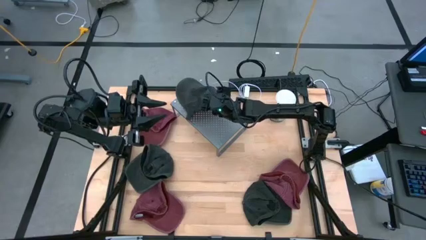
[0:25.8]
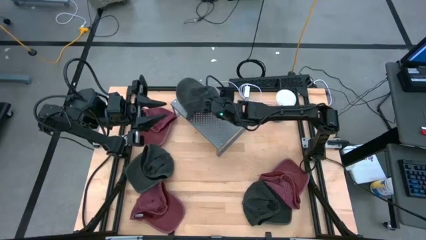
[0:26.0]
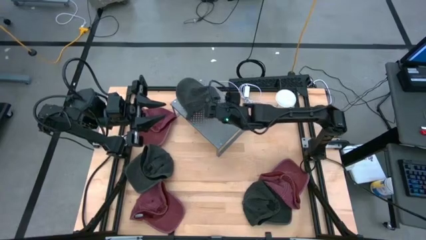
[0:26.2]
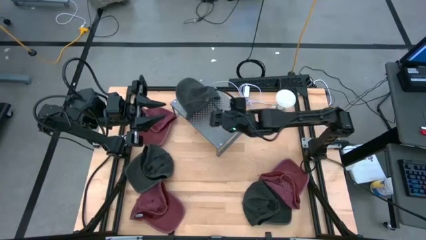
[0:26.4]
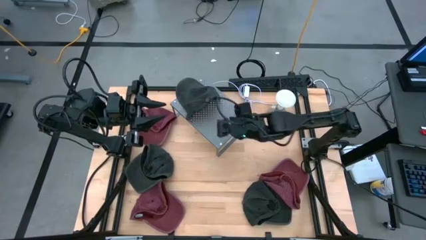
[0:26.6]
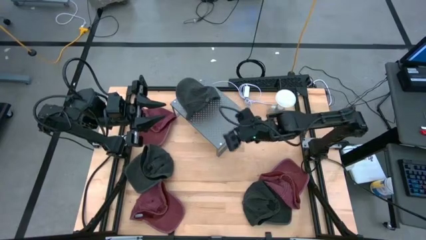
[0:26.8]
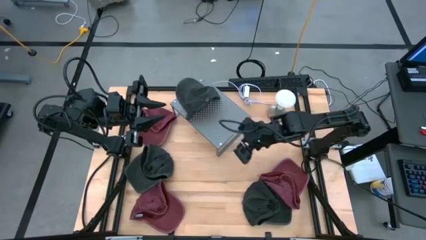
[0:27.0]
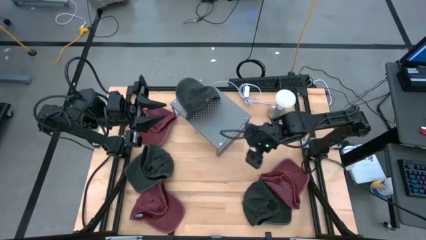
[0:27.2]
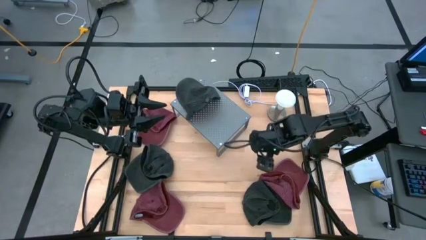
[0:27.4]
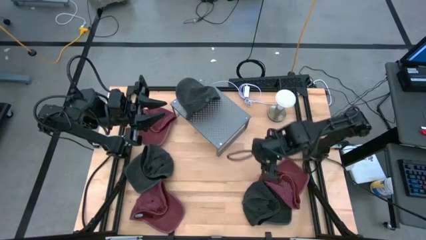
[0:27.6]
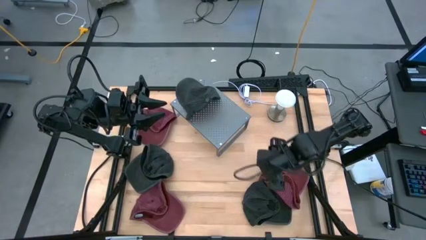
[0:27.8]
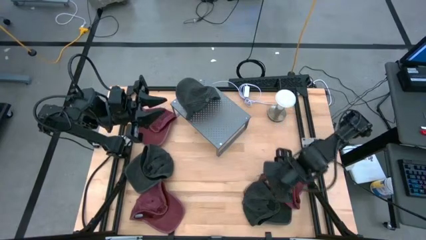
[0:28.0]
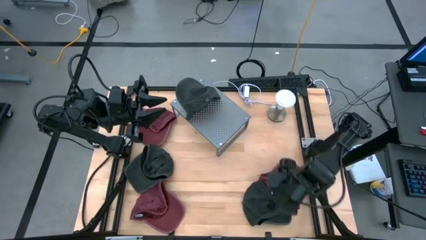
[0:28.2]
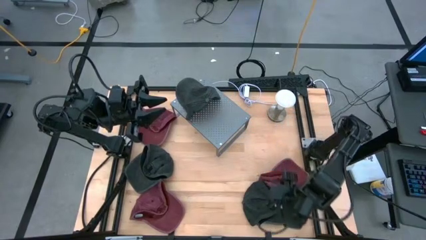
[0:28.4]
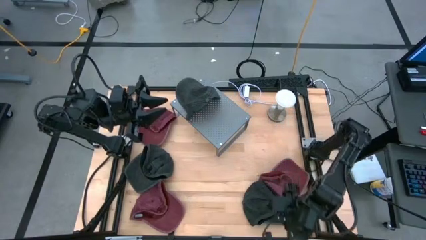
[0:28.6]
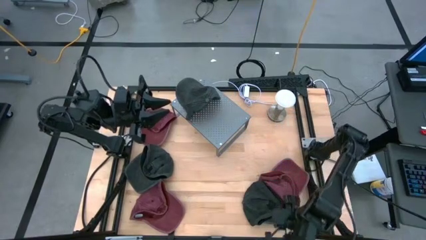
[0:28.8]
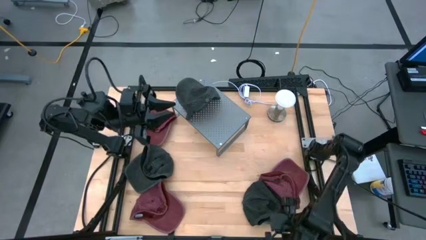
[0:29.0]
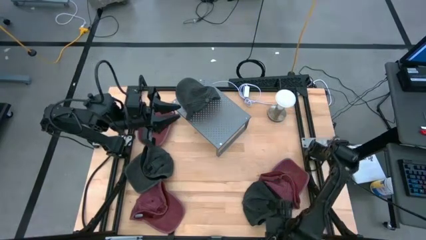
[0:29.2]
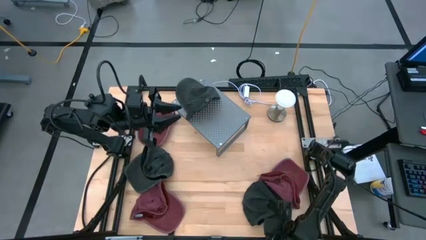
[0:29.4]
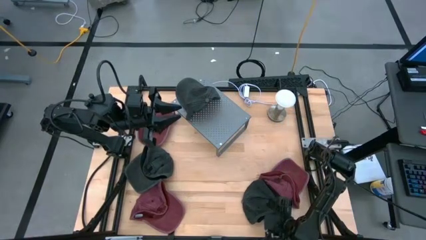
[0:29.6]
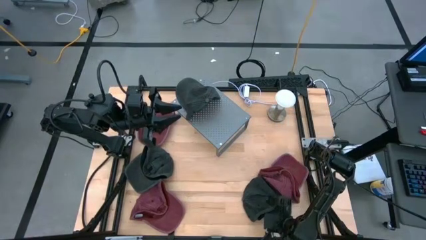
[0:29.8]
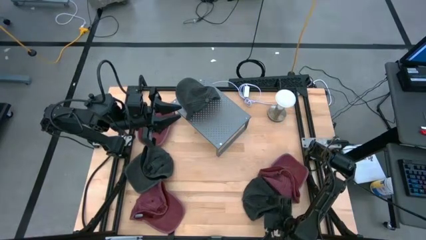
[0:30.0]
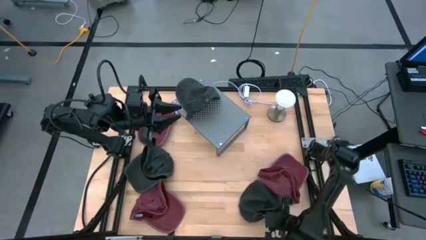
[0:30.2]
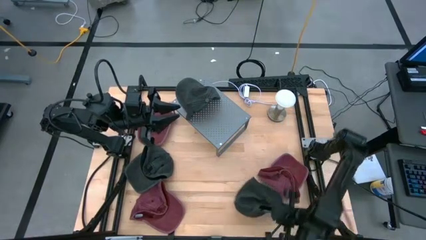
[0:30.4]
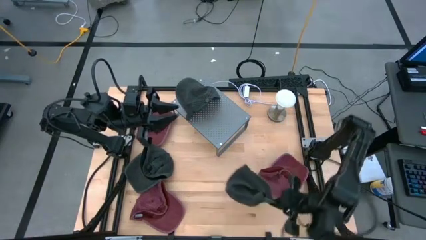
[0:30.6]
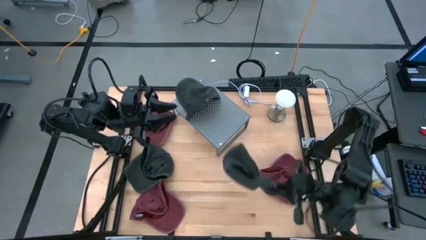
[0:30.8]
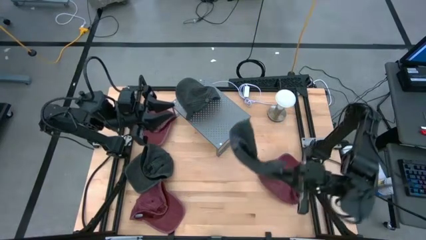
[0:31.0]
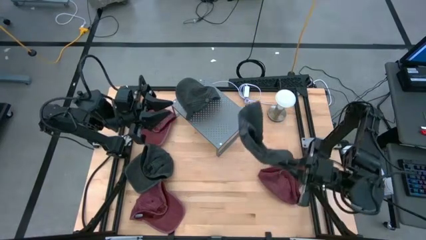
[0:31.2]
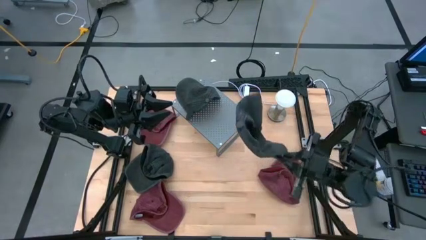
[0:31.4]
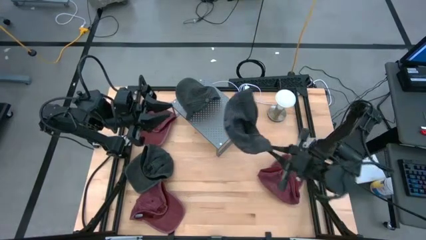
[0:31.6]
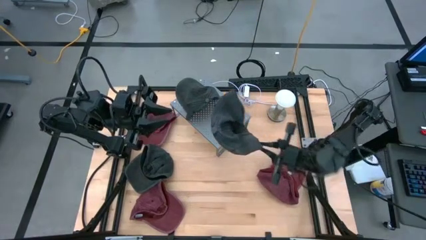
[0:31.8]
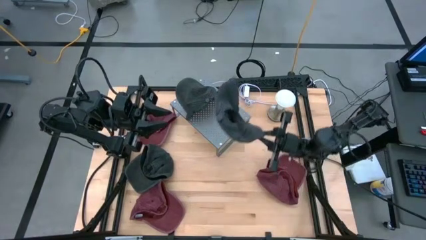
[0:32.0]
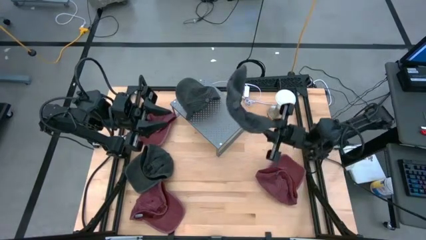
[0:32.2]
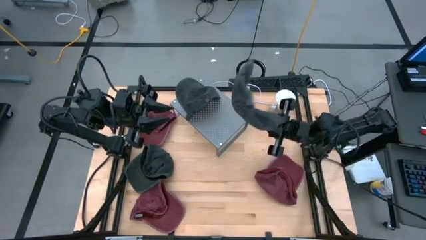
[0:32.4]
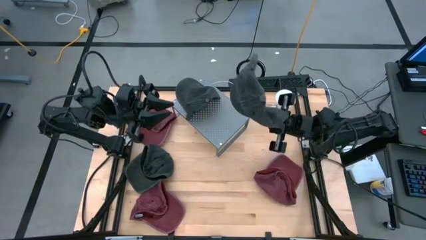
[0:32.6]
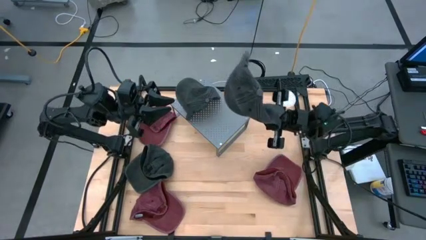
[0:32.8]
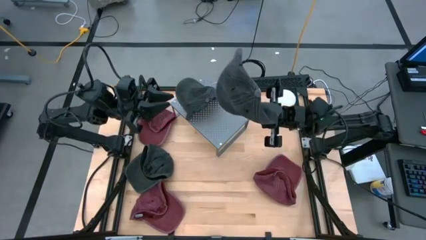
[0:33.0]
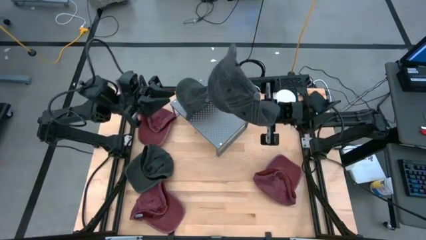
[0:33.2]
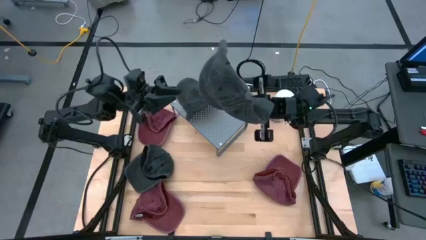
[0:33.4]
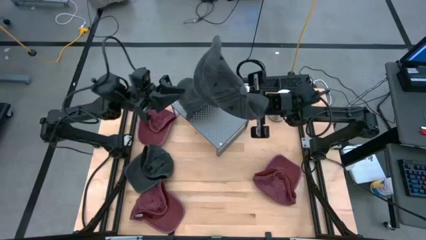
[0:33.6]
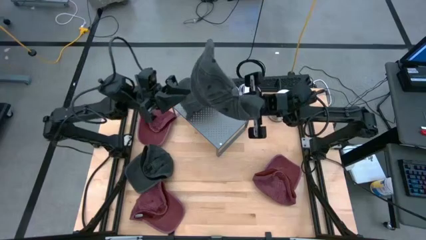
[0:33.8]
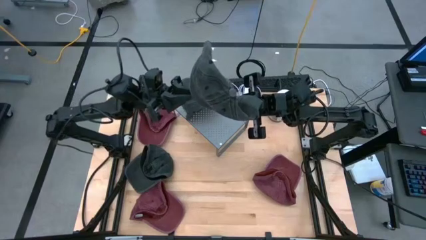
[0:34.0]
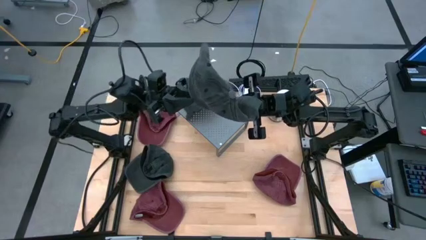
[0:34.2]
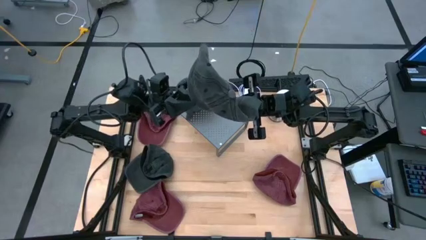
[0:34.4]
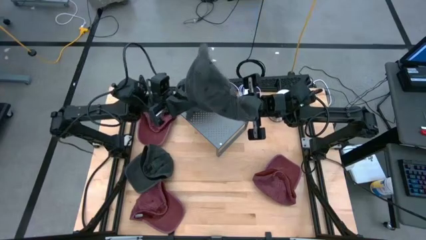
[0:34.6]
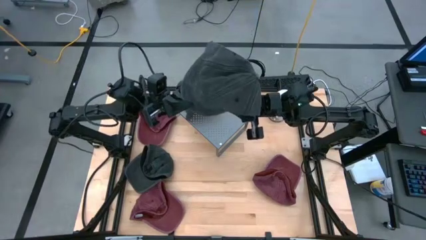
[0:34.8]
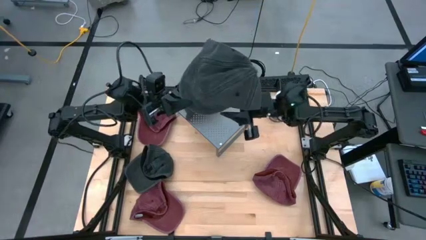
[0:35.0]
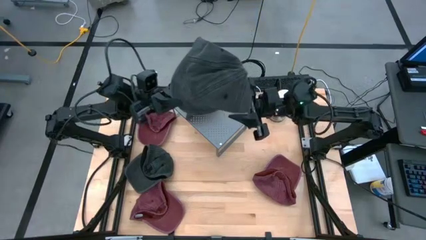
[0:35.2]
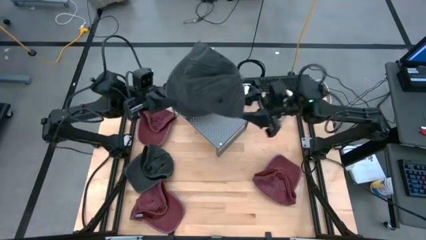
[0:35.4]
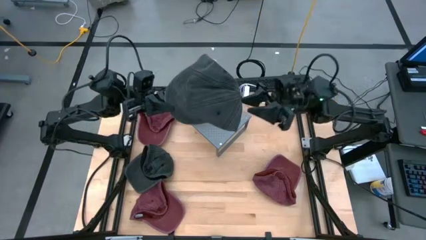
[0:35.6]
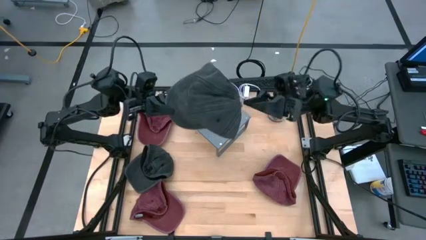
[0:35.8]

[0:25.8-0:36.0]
Task: Pick & Place hat
Stack the bottom black cap on the black cap on the shelf

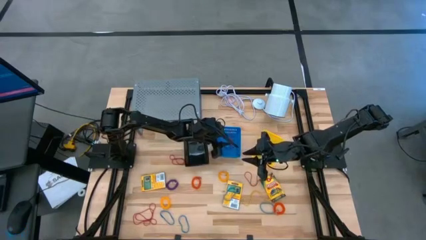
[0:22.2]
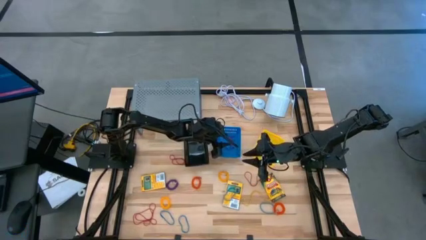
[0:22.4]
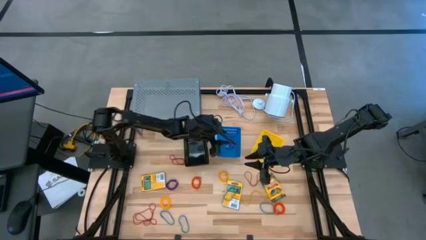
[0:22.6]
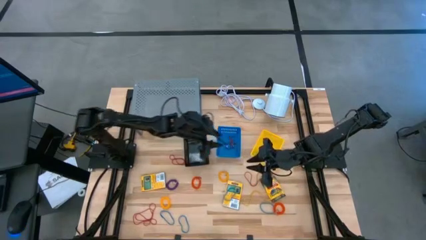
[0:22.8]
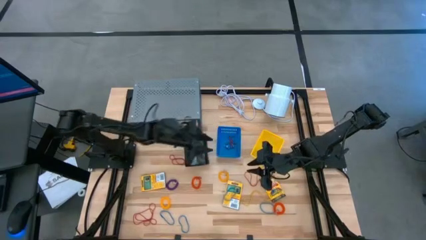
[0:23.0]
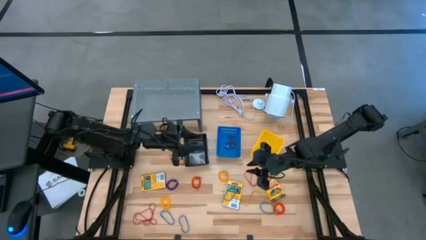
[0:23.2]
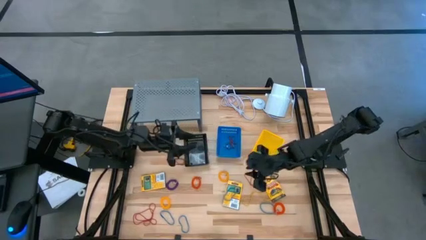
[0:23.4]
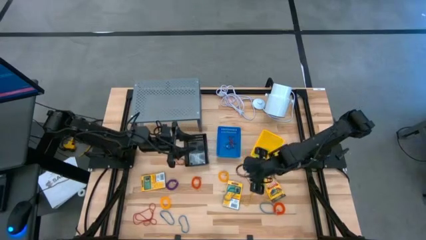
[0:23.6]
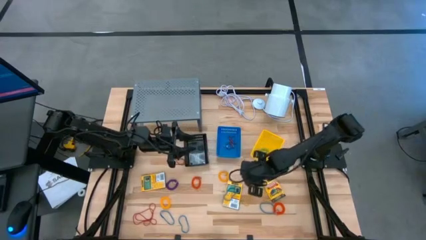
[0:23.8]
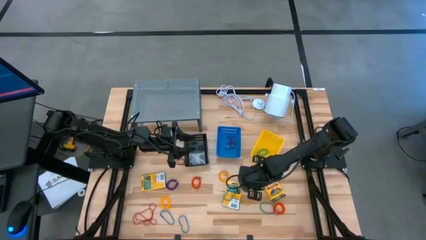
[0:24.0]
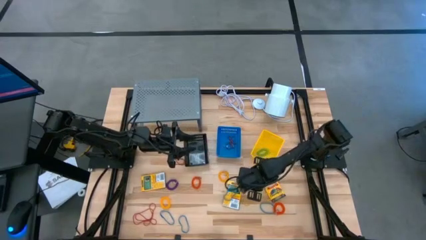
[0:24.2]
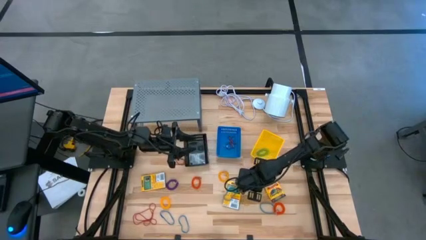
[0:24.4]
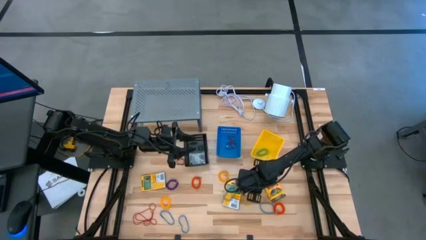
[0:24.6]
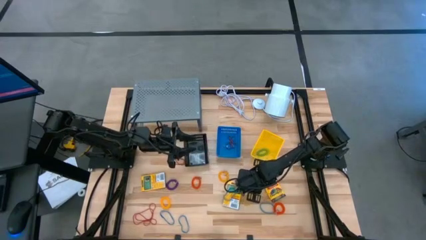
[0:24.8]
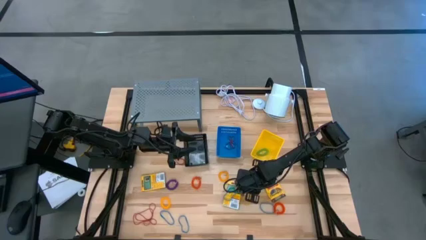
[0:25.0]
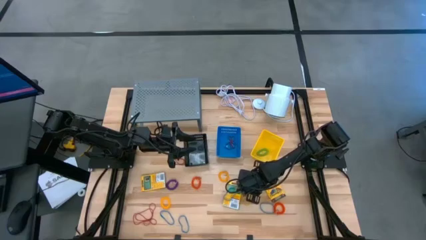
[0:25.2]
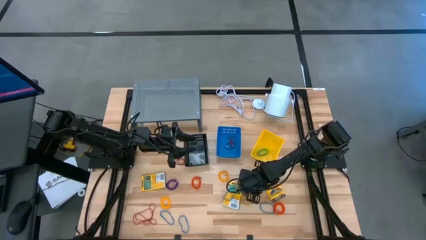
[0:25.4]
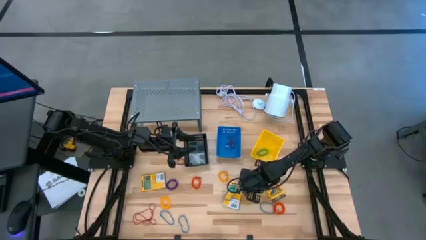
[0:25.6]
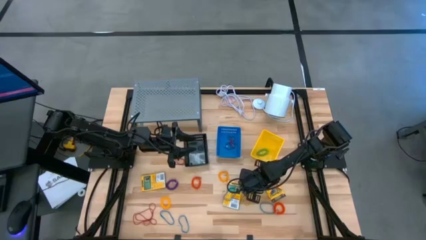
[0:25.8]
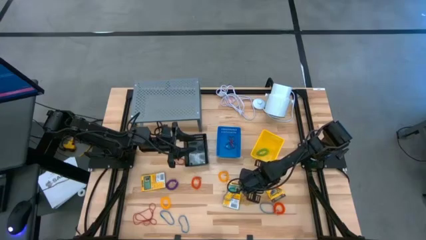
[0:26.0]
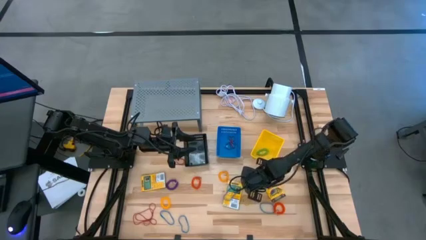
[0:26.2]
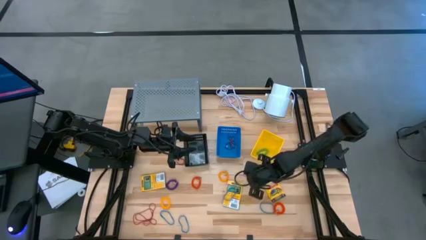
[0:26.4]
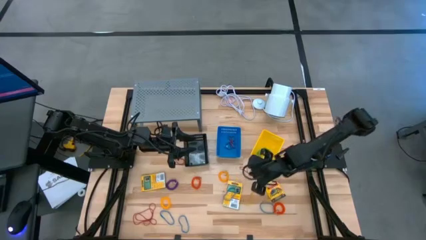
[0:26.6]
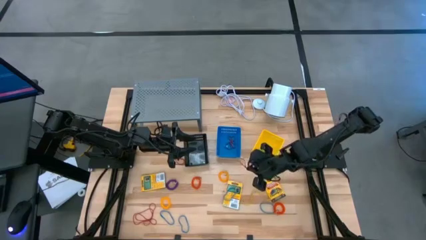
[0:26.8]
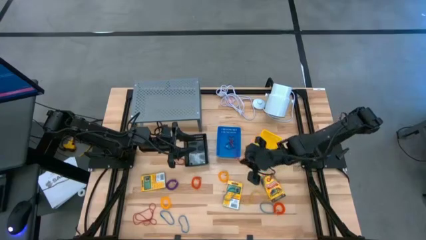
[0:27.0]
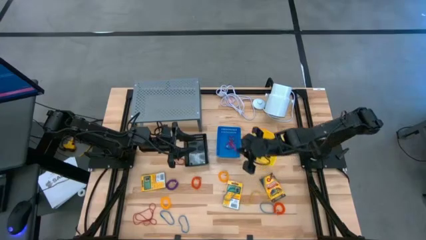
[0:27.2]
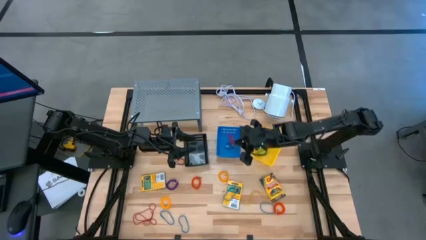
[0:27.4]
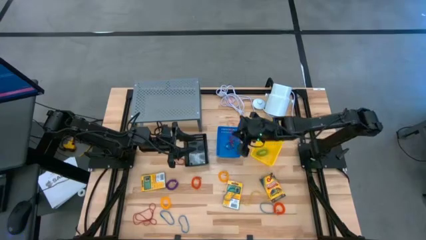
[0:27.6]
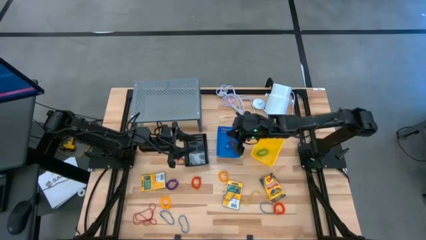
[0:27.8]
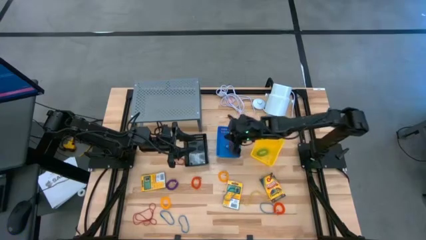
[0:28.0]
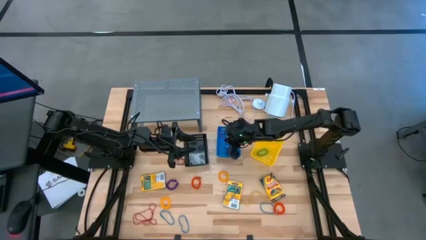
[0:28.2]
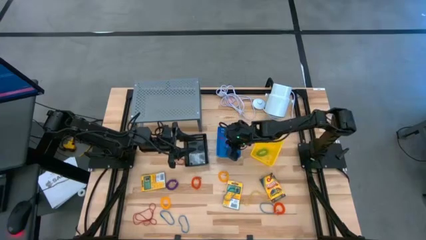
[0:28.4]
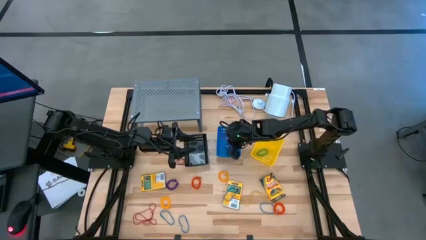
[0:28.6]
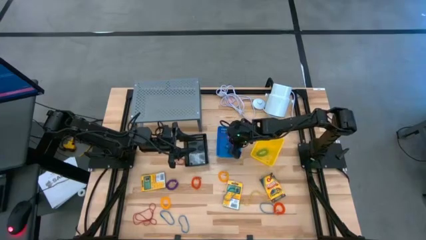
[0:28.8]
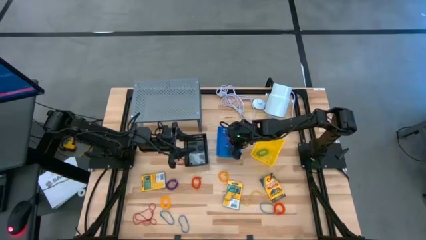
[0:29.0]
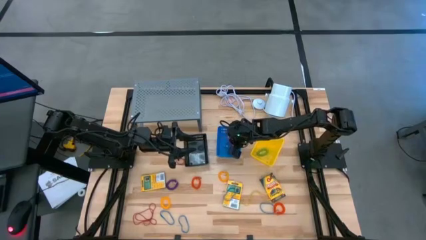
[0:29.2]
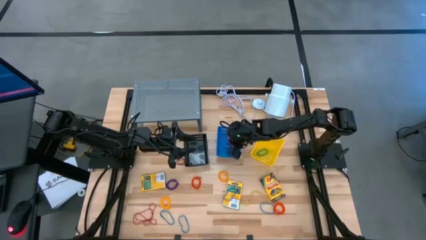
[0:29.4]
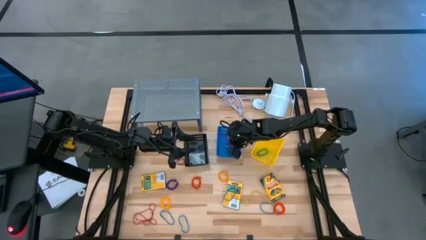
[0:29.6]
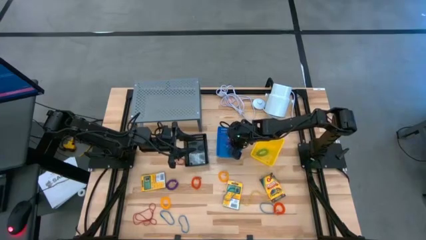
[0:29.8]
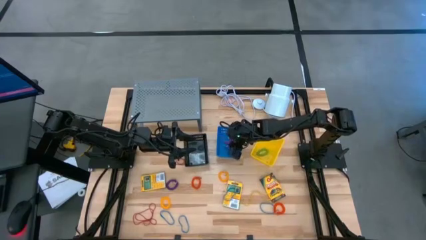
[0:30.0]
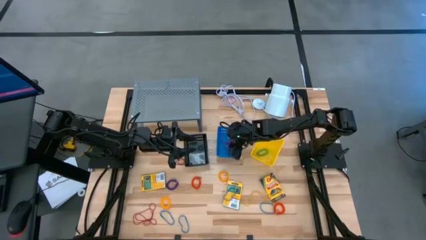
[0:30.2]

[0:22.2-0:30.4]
Task: Pick & Place Office Desk Supplies
Put the red rubber band into the blue basket
